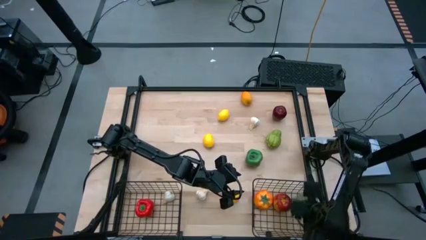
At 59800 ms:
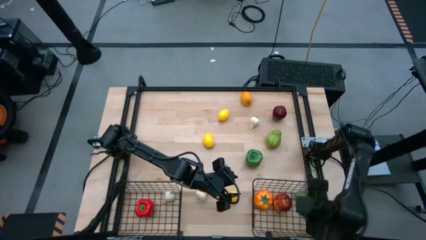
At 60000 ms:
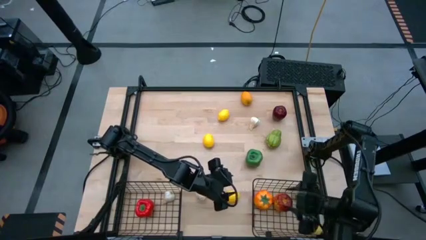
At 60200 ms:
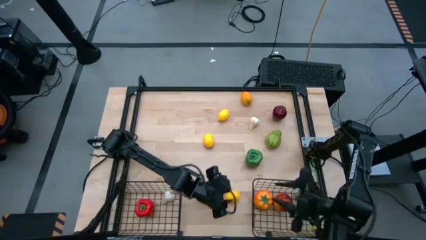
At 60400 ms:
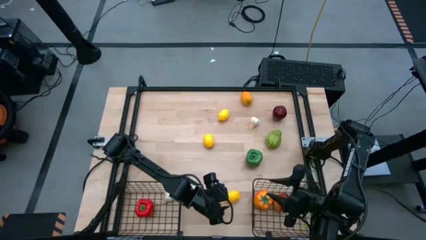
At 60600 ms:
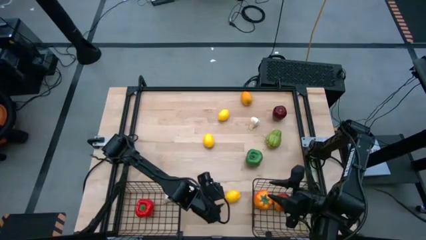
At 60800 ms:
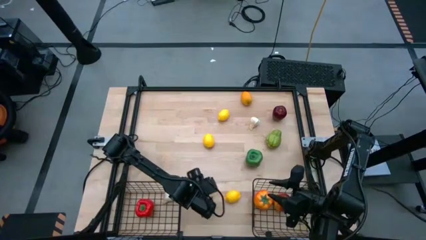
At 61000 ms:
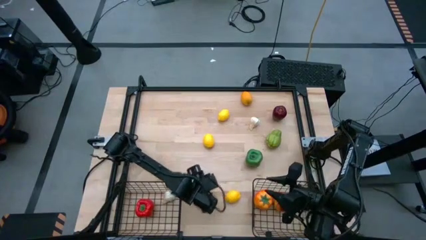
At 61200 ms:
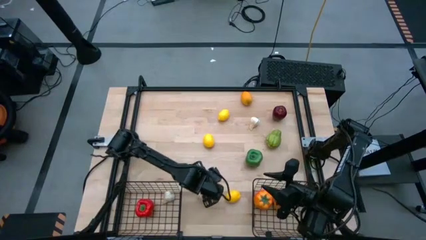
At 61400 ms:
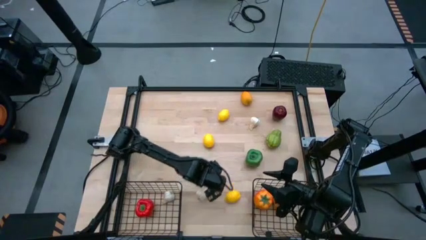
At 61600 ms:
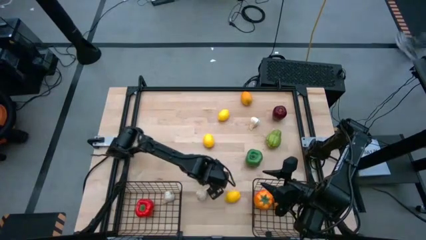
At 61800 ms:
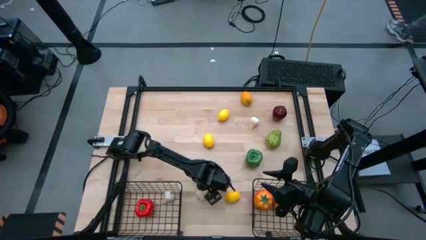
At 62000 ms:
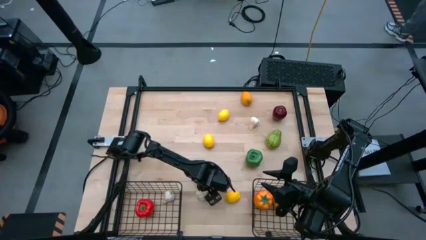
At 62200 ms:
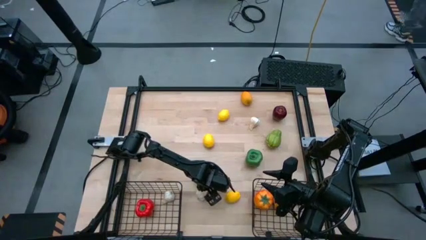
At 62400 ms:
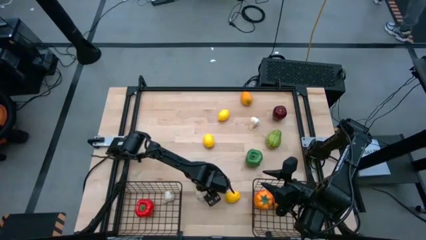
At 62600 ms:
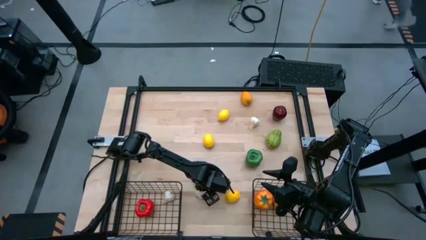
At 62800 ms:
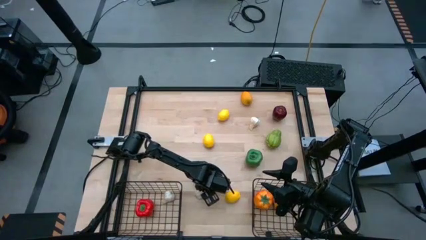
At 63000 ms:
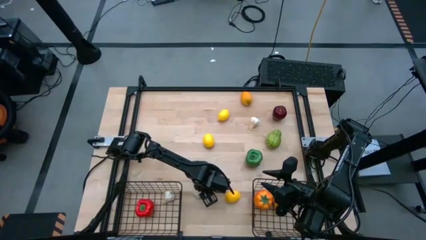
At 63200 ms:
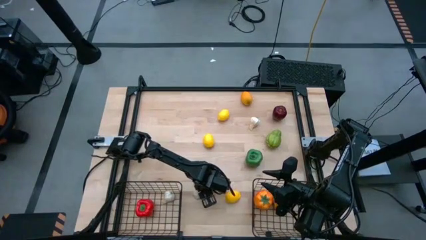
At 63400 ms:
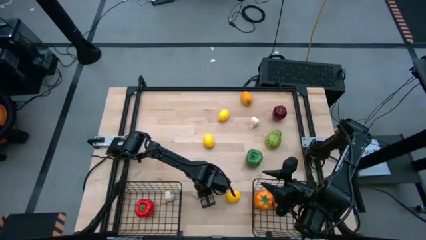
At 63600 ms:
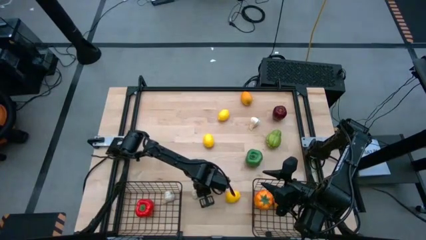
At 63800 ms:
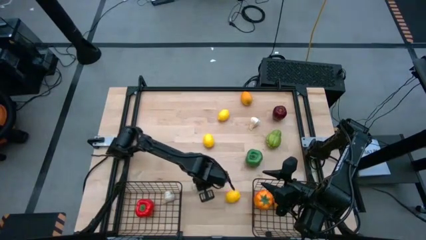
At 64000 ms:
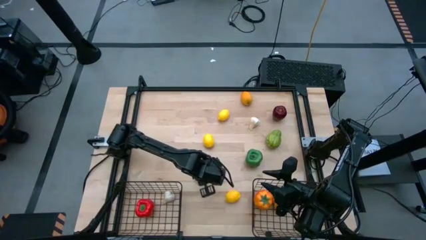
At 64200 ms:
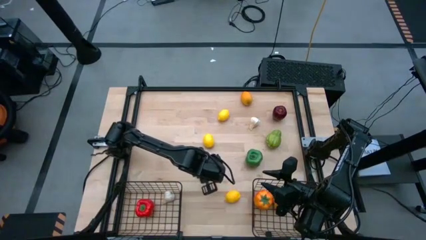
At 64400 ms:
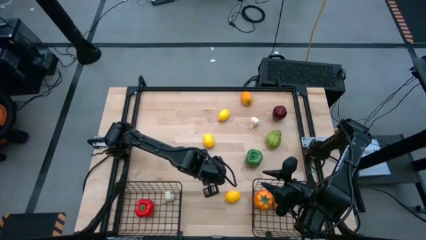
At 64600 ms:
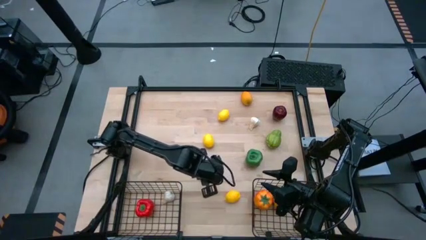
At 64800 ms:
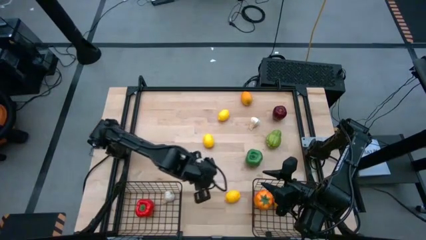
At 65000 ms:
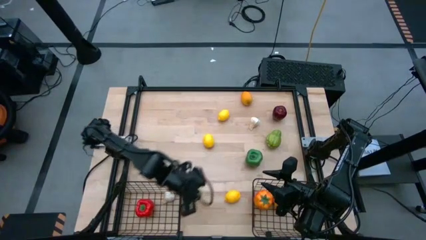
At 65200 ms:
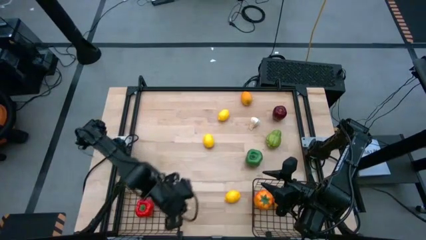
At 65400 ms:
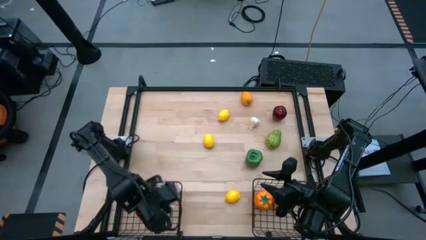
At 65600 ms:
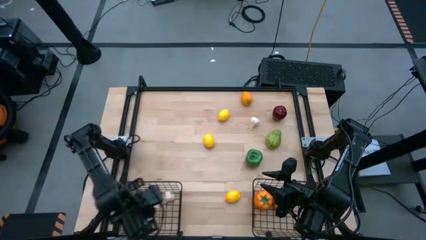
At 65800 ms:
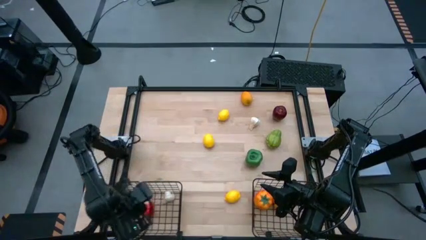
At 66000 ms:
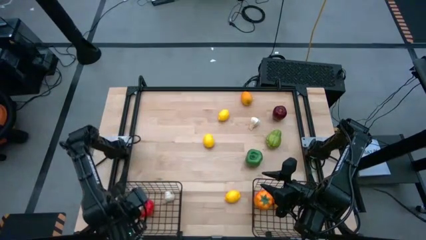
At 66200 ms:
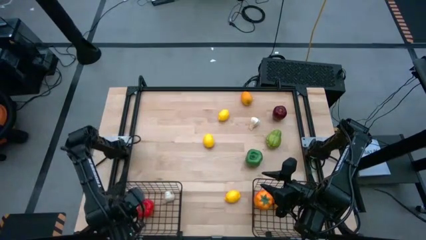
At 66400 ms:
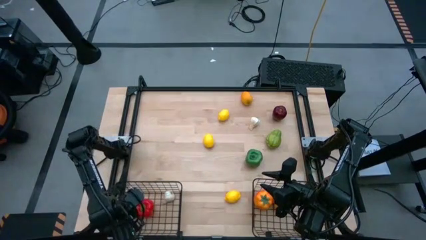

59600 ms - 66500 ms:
Task: Sort produce into baskets
Put the bottom white garlic into the left black wire basket

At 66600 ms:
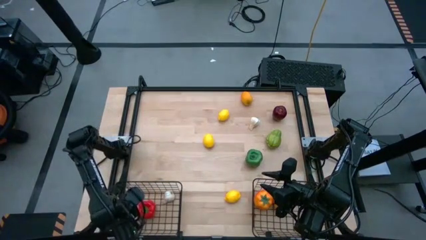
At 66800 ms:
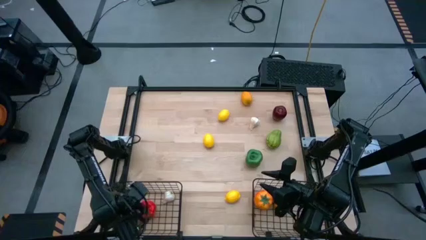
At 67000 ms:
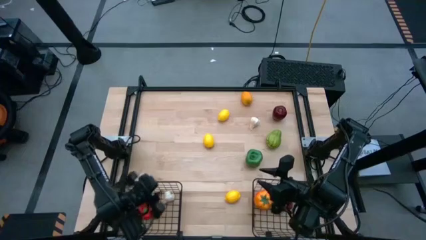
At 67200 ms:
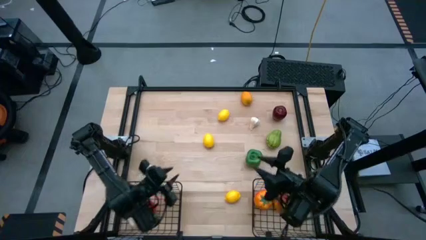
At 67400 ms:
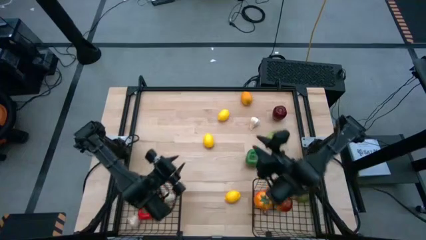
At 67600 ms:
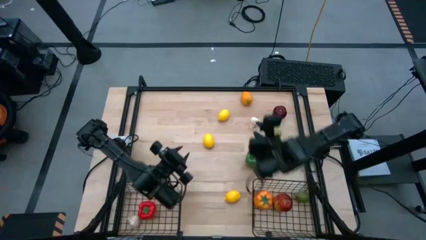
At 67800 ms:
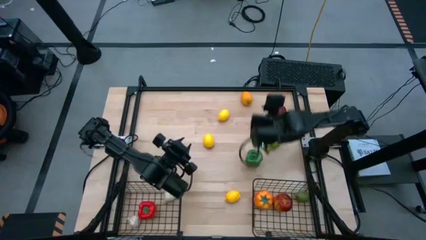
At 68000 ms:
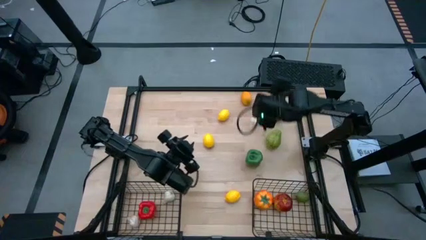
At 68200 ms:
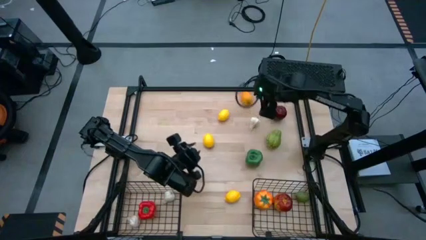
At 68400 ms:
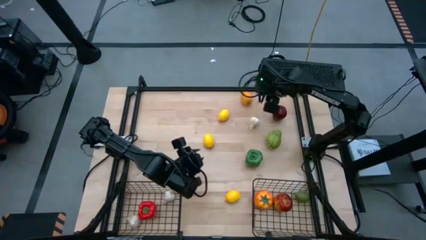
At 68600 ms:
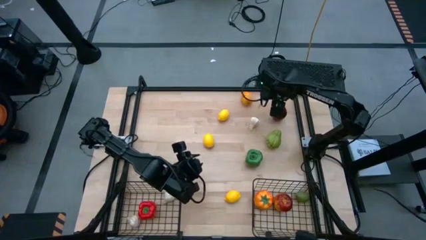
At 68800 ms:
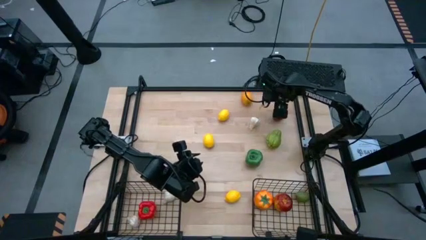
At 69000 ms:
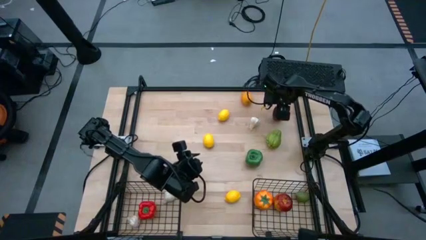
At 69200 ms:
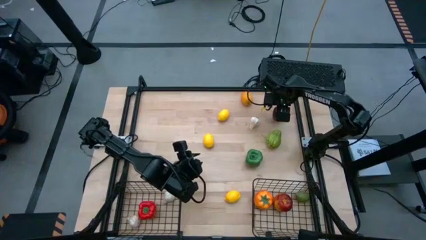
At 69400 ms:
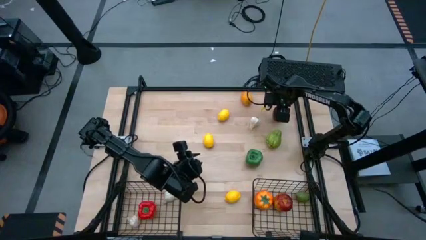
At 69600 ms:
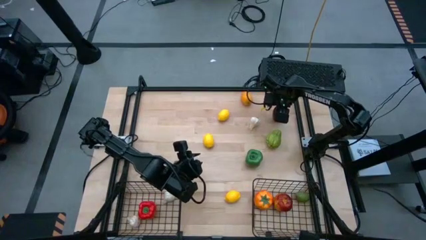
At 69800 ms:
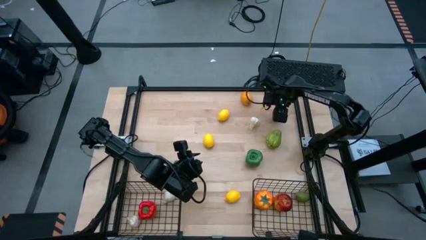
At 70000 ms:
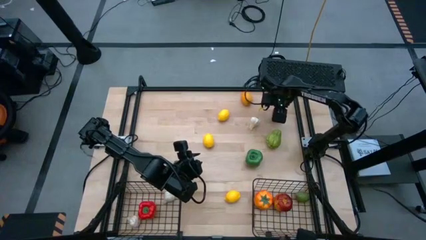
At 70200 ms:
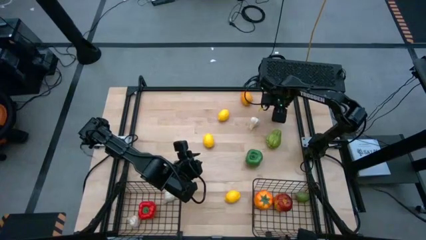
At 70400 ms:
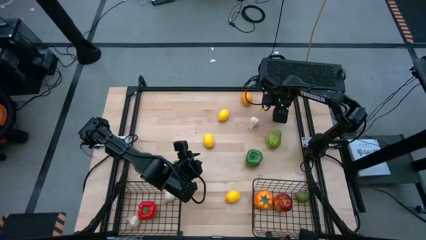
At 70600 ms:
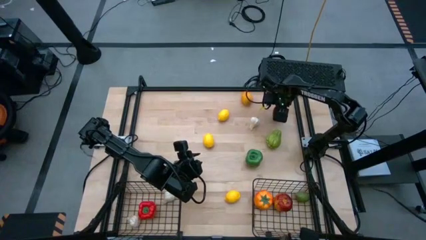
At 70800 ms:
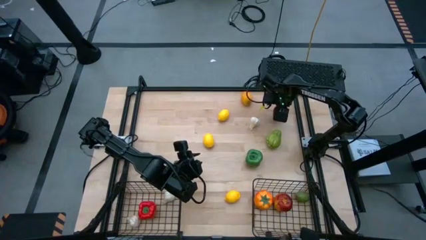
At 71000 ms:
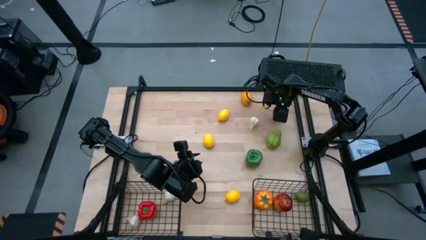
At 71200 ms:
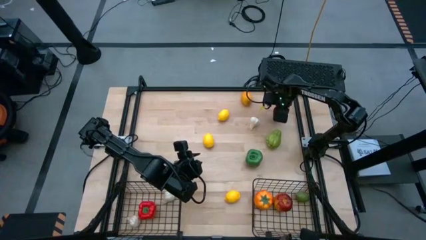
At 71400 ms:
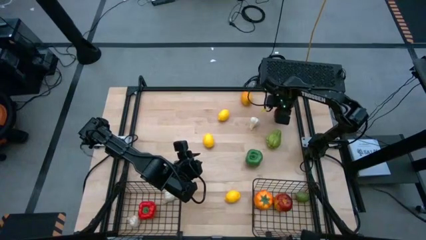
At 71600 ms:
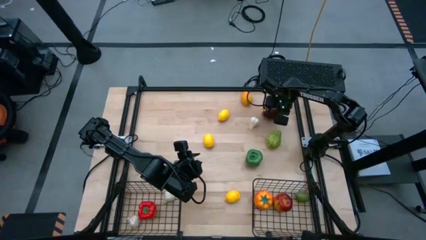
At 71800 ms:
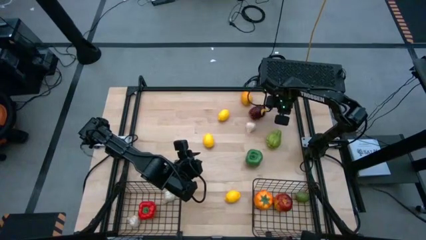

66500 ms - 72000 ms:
Put the red apple into the right black wire basket
